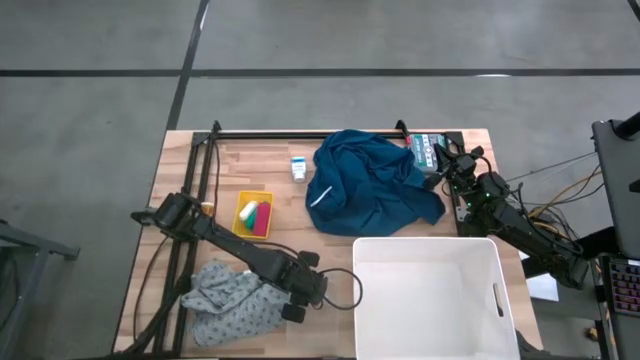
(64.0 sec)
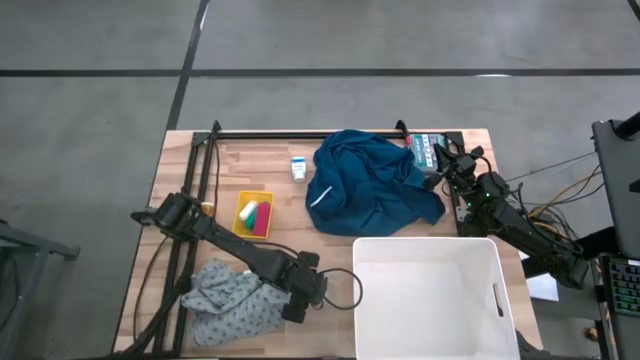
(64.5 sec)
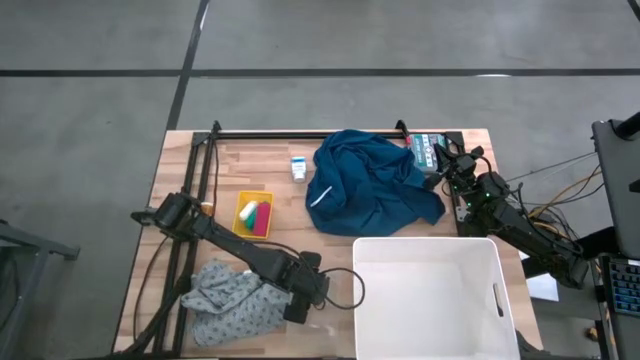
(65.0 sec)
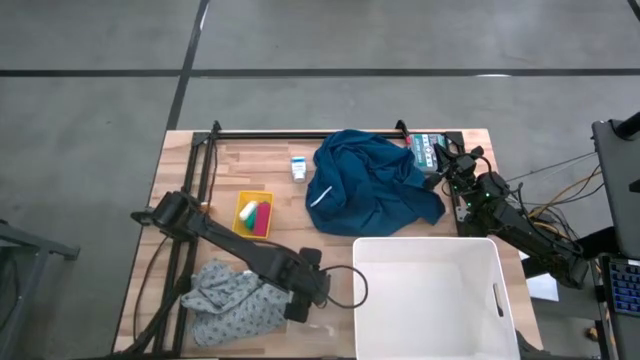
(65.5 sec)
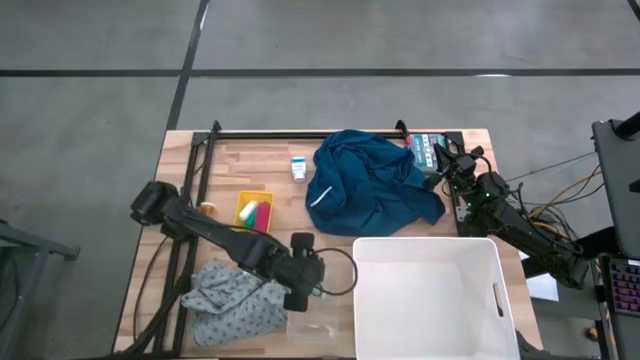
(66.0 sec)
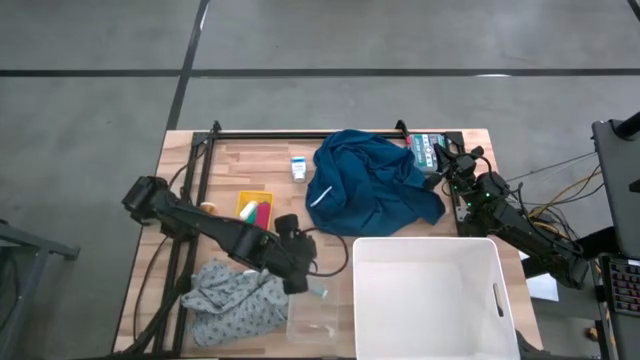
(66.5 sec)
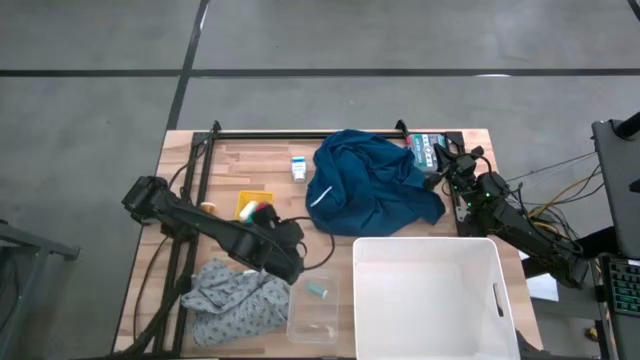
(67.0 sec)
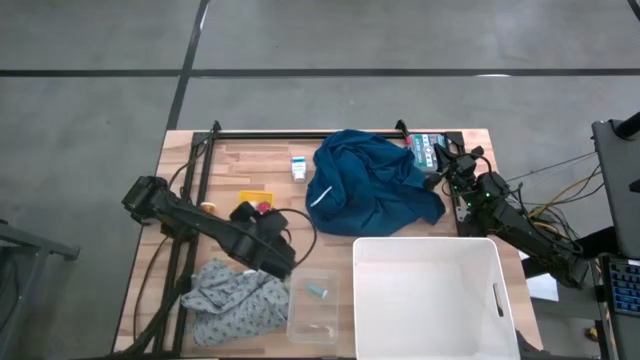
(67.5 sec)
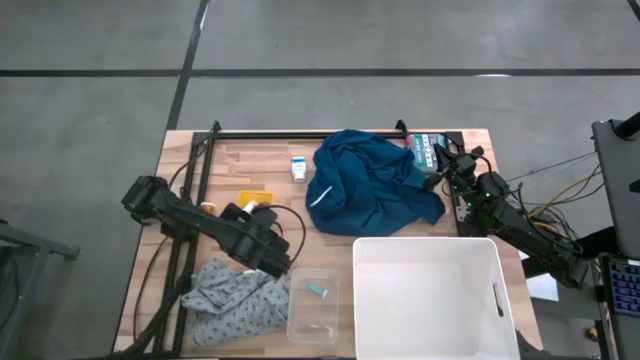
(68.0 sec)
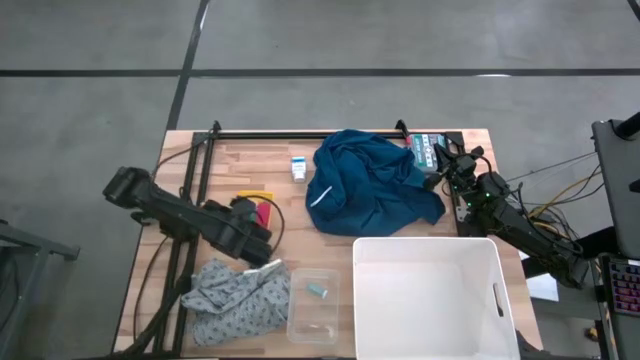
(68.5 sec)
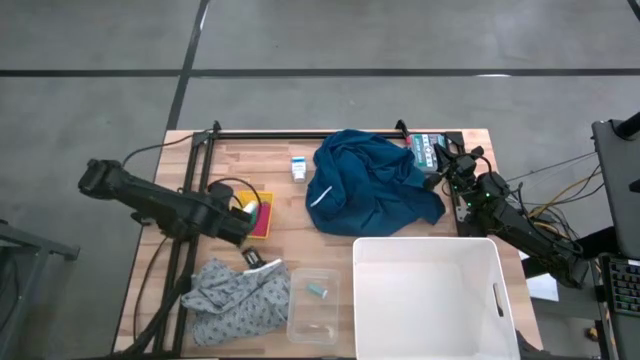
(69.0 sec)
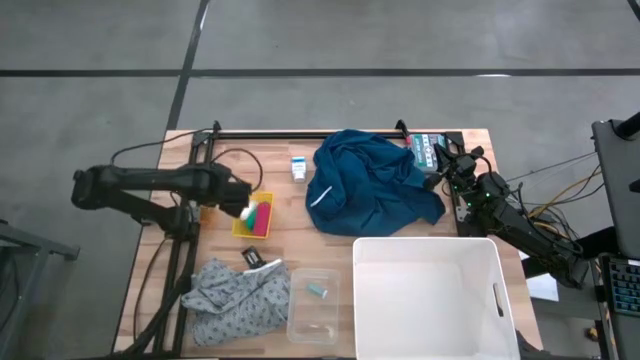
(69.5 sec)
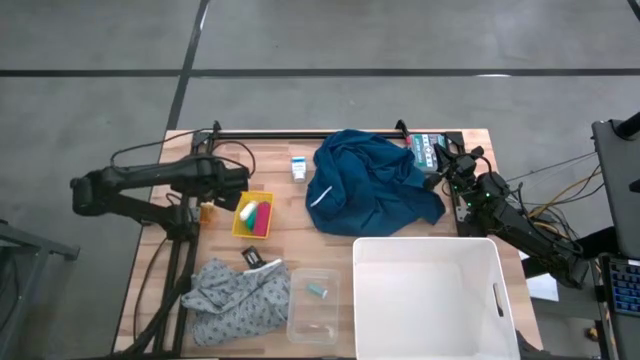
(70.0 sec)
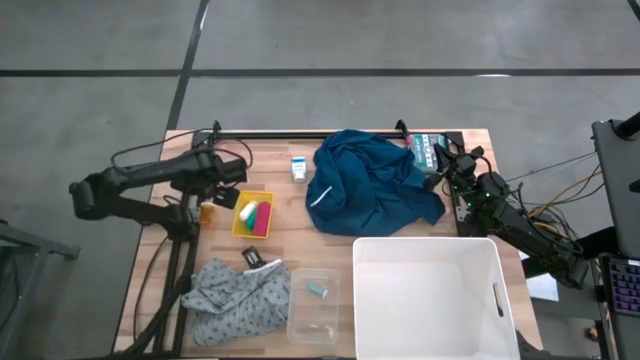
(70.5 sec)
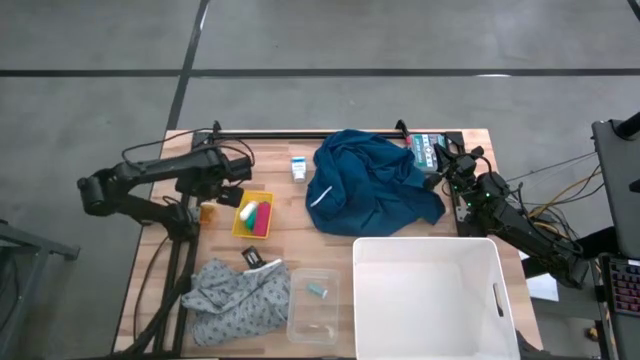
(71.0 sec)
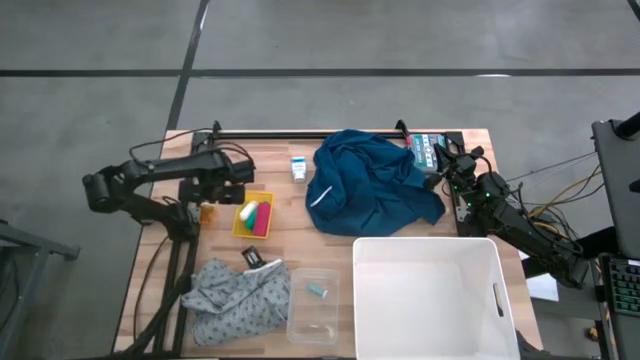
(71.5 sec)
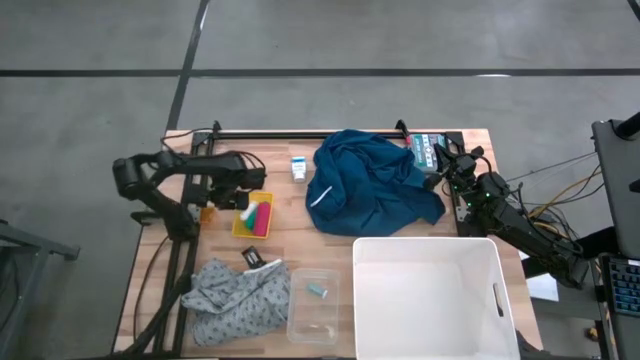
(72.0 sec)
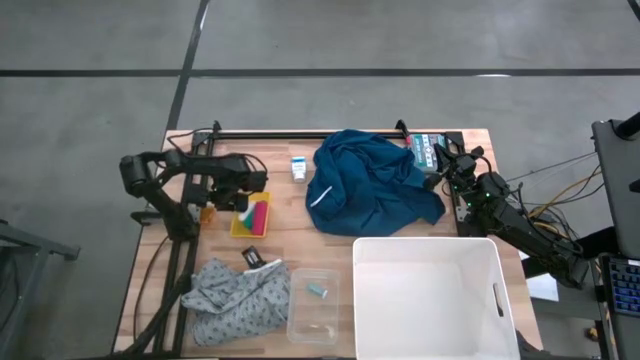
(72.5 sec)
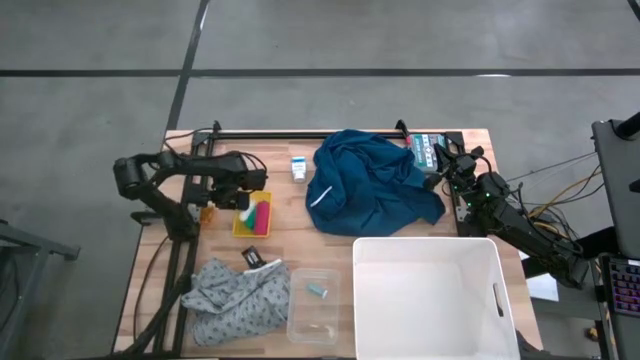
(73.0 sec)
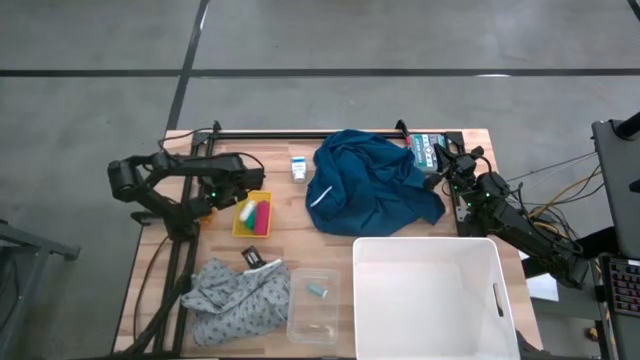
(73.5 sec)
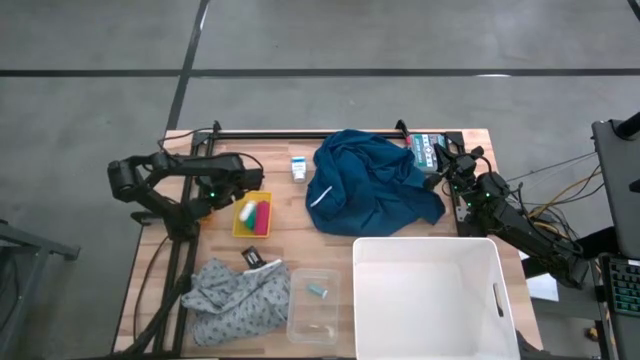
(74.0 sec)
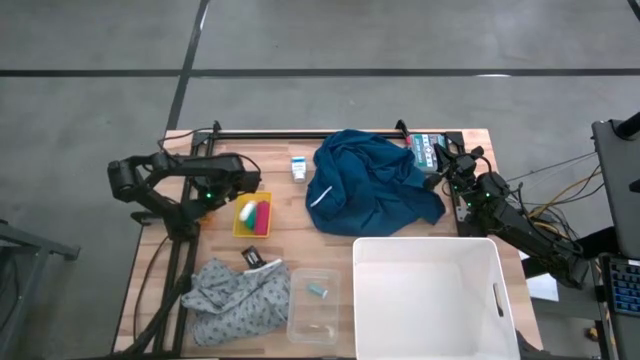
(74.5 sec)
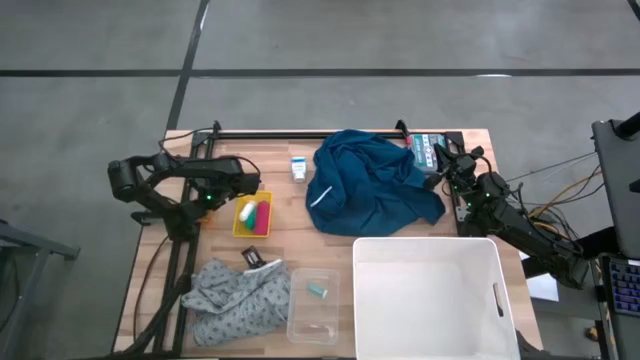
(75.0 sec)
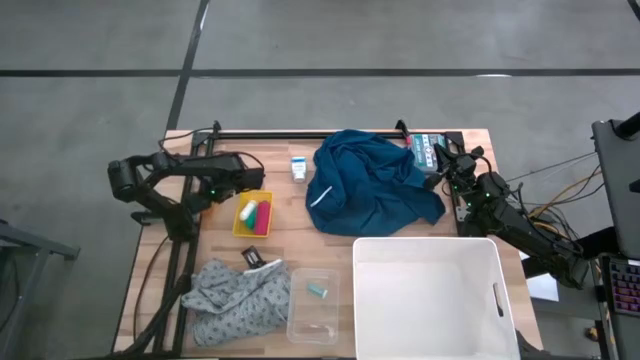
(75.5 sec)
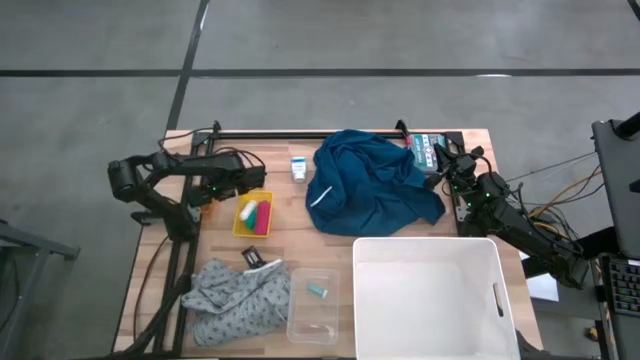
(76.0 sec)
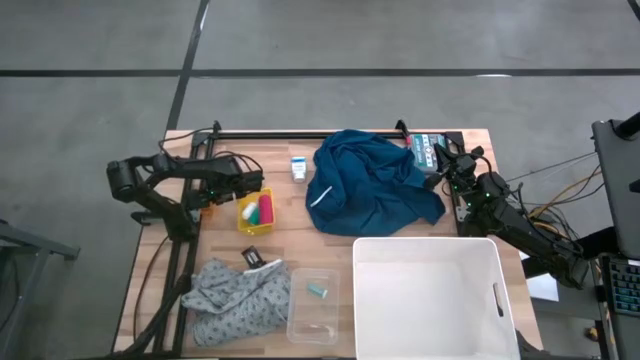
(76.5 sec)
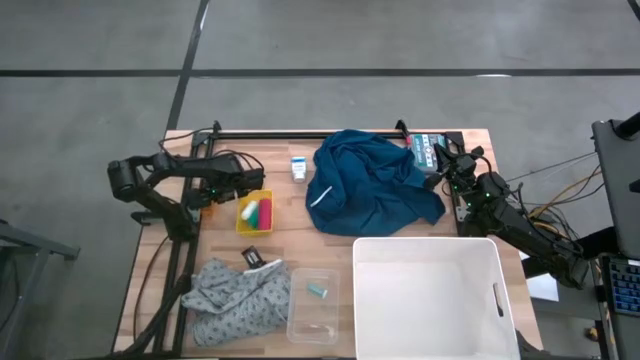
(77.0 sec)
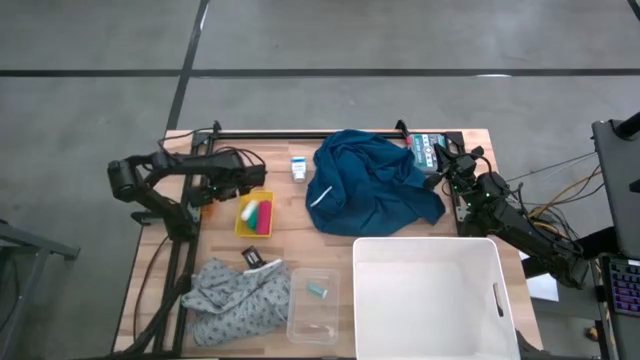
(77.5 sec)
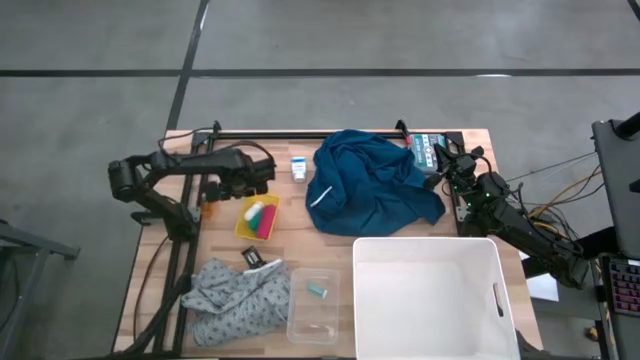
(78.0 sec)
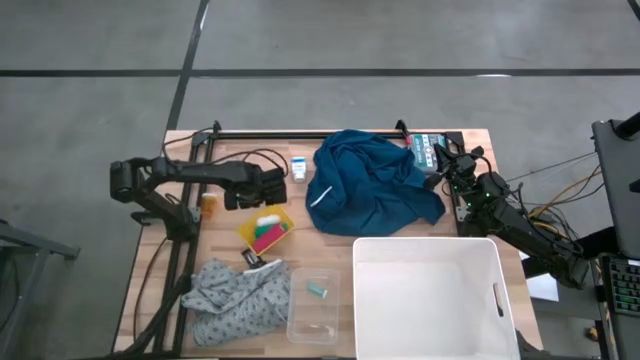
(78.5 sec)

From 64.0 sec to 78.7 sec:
Task: Pick & Place Medicine items
Put the orange pill bottle into the transparent bin

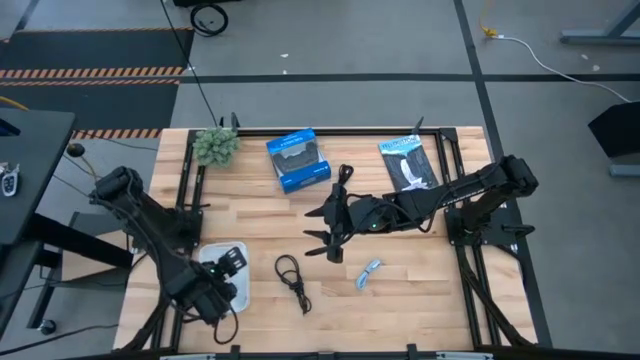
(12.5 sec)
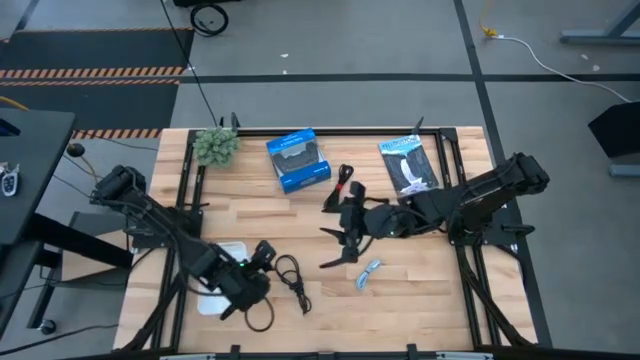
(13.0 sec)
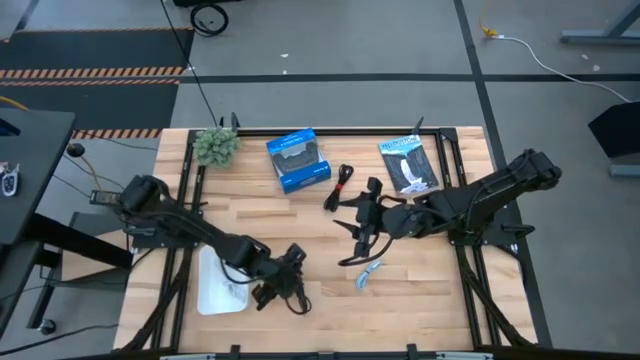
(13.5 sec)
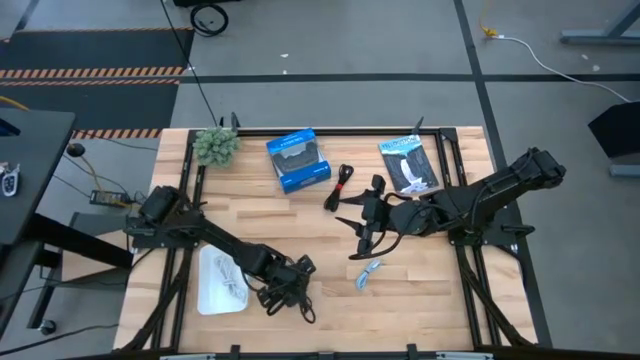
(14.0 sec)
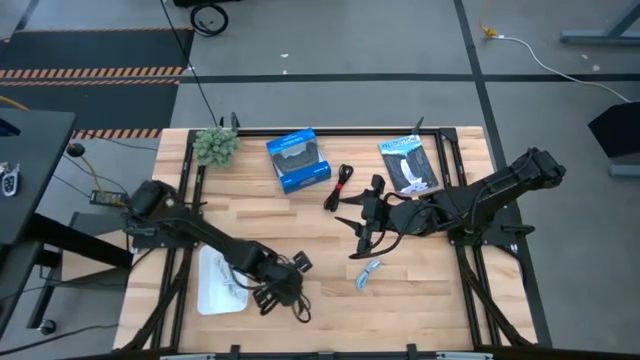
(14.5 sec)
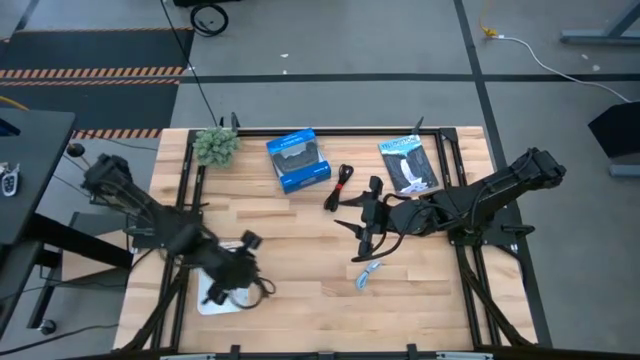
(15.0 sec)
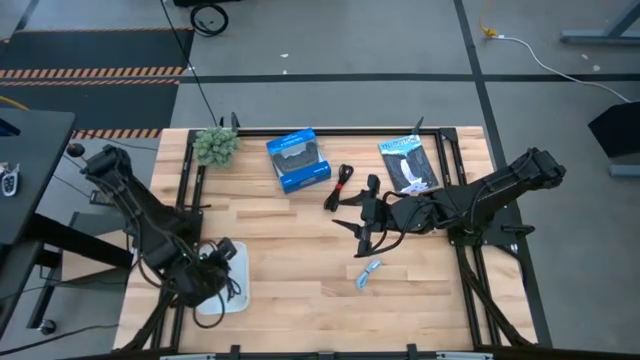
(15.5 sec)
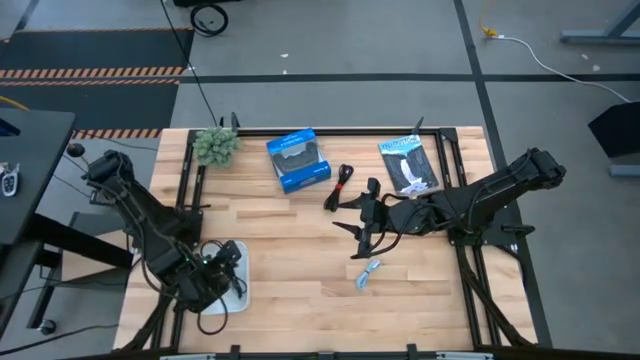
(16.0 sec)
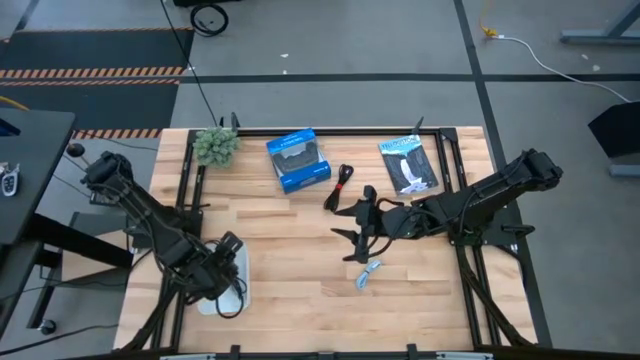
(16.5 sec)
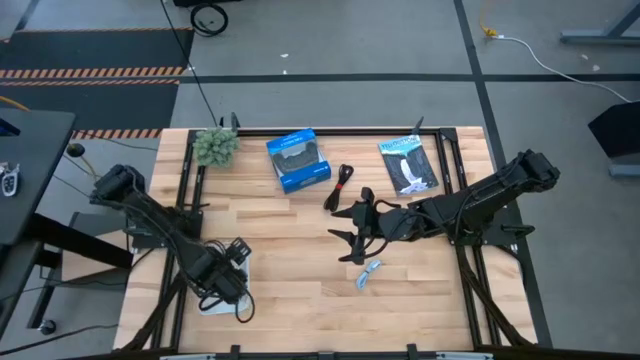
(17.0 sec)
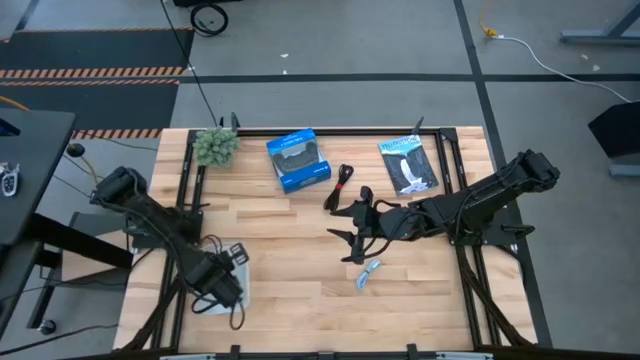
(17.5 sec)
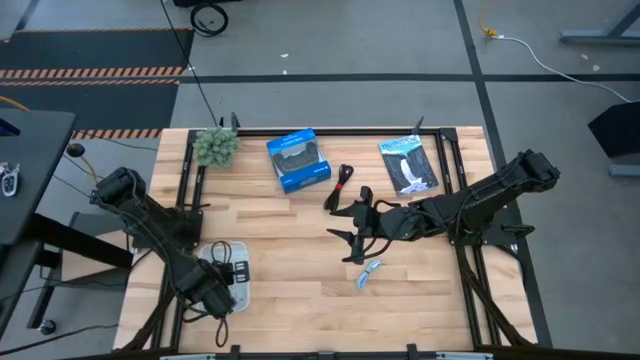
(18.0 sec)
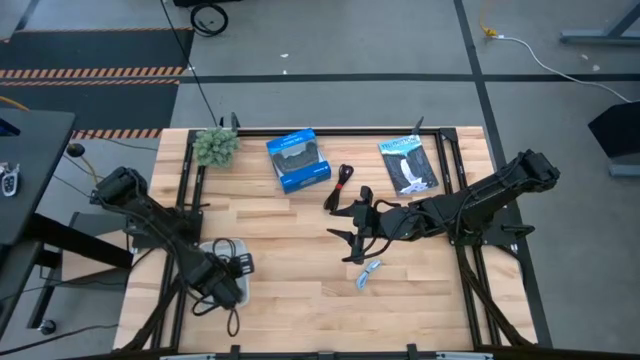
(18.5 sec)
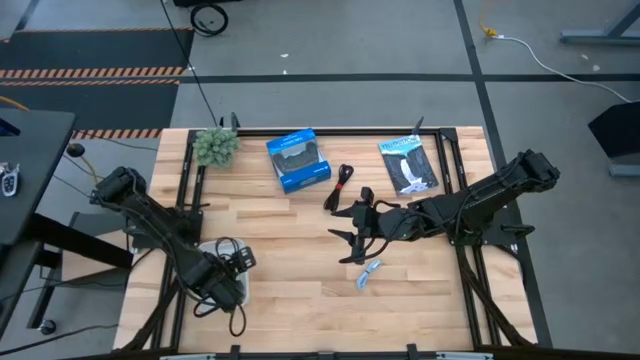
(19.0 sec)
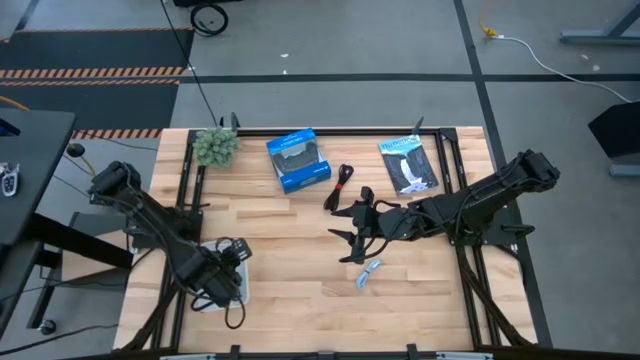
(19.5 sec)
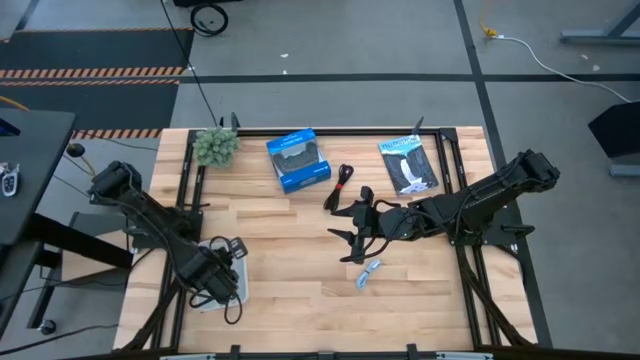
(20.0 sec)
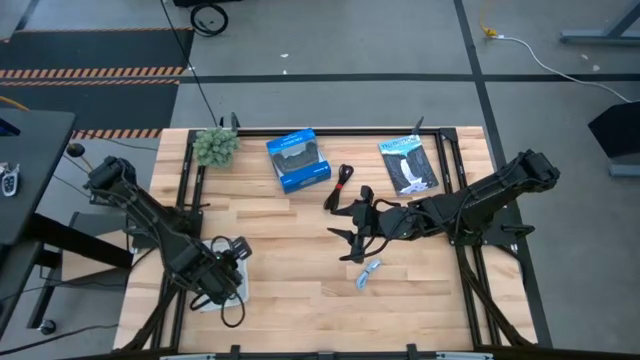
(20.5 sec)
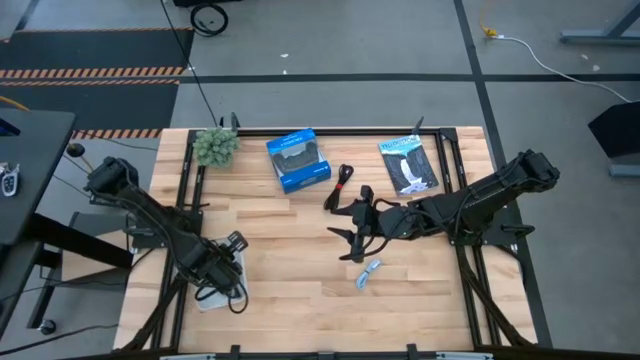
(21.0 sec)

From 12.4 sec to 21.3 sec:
Task: Pick and place USB-C Cables
Put the bottom black charger cable into the white bin
